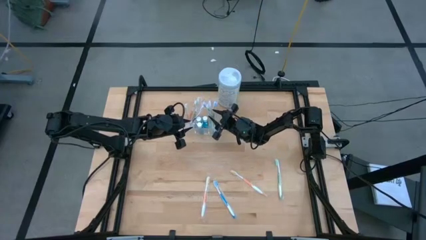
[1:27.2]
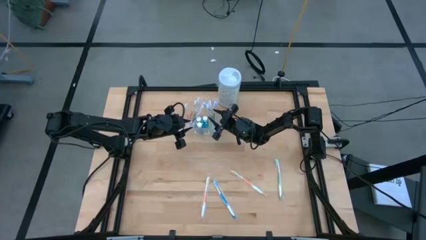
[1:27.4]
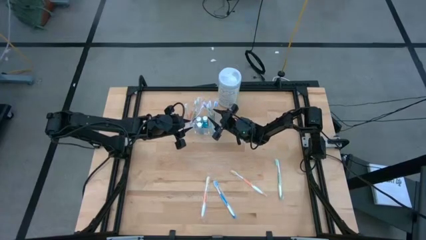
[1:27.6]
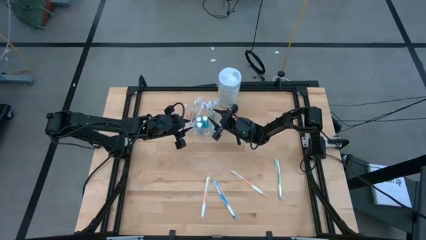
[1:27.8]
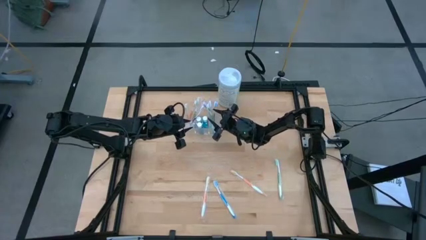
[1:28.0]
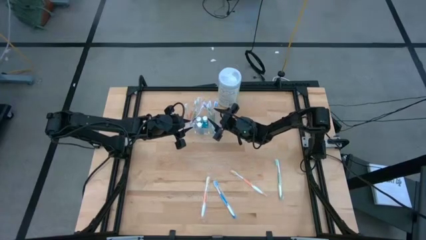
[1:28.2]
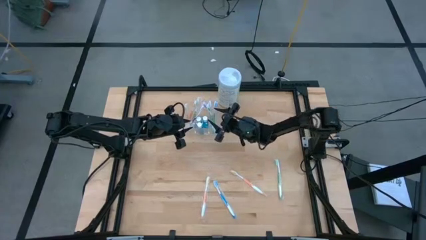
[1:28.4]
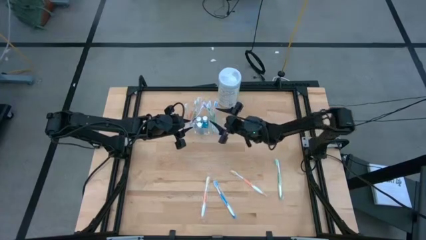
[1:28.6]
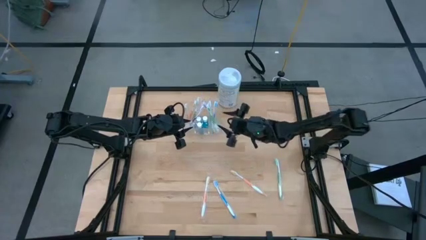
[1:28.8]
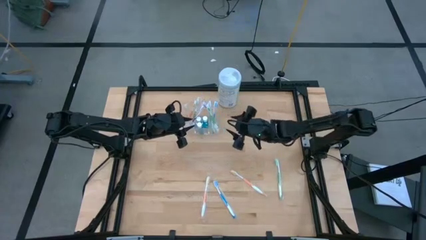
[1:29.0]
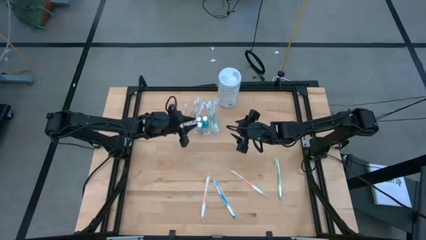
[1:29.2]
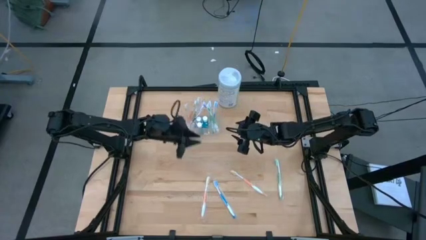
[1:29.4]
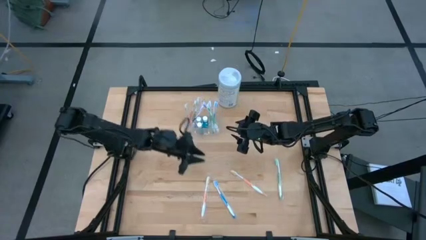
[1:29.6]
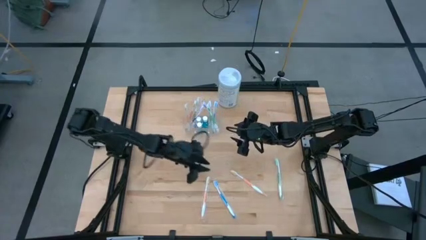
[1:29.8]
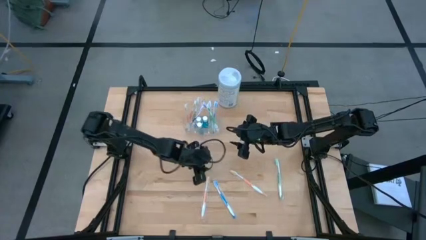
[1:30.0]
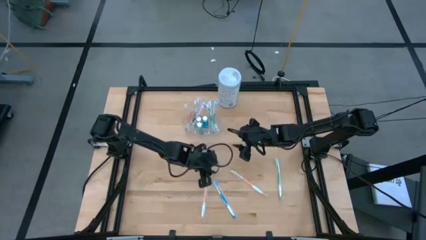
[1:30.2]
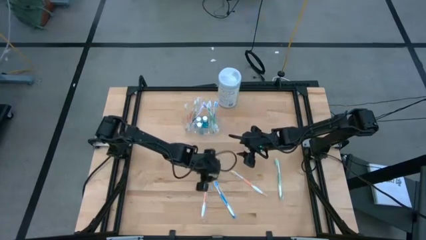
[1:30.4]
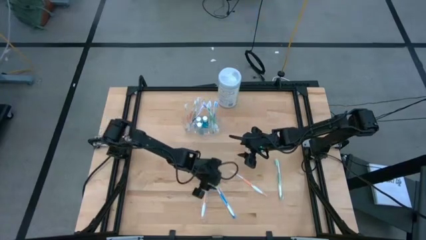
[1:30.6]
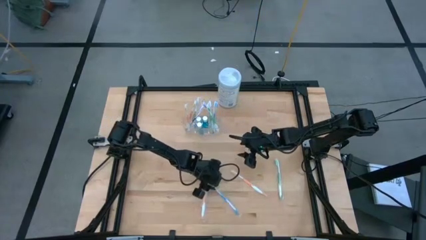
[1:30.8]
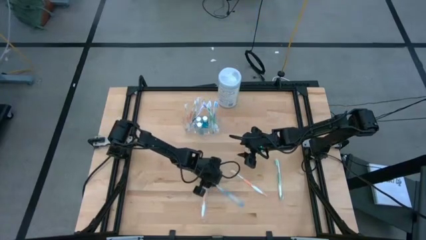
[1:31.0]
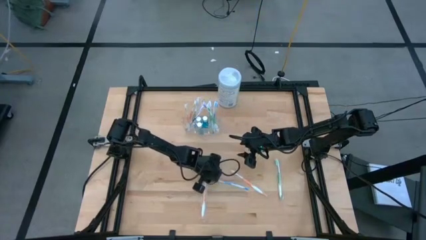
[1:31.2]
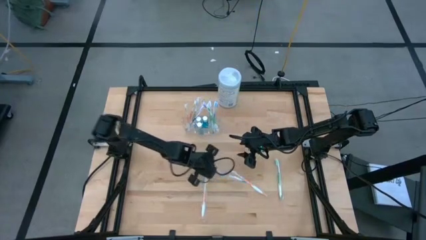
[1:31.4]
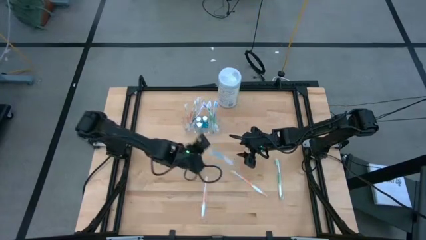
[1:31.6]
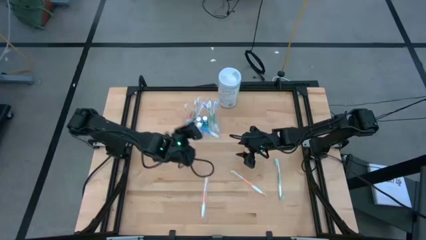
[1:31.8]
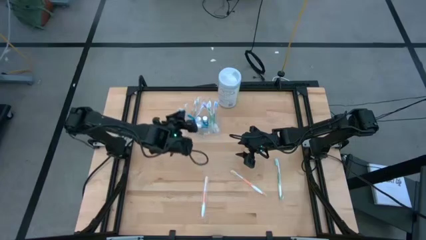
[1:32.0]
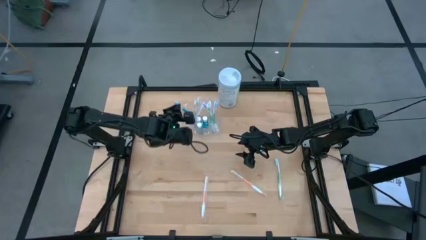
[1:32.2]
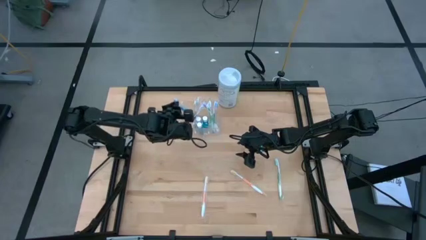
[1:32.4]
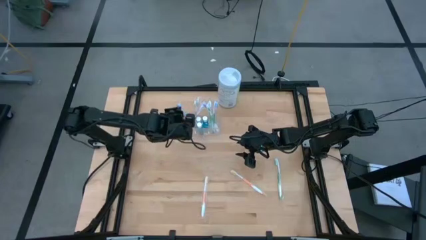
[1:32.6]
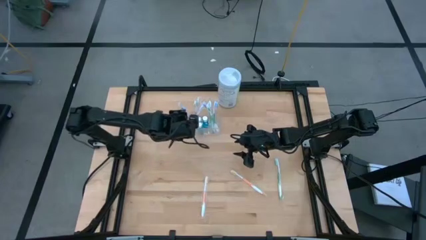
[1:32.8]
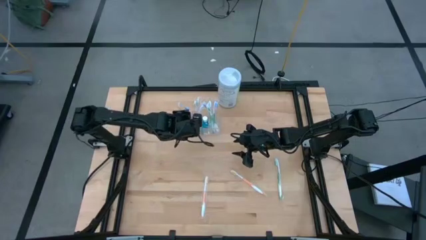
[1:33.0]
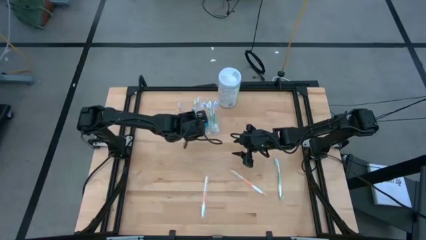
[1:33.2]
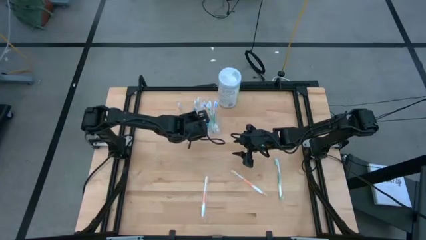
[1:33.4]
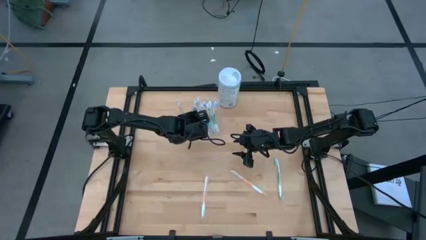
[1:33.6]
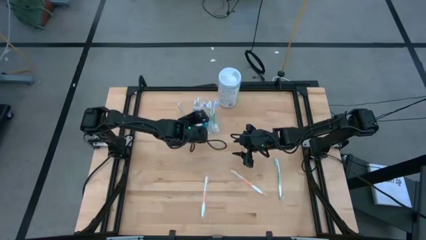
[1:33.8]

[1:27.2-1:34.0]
Task: Pick & Place toothbrushing station
Put the blue toothbrush into the transparent organizer

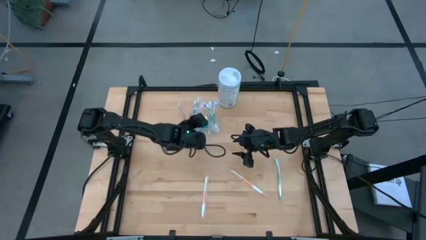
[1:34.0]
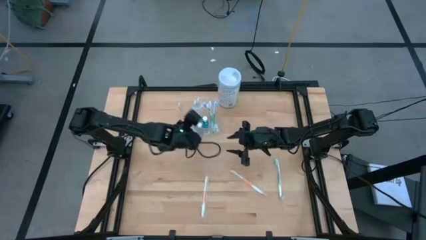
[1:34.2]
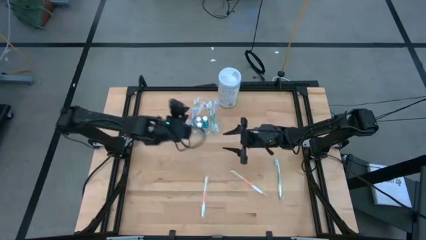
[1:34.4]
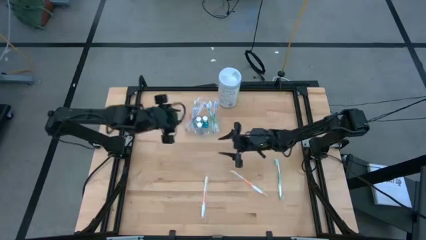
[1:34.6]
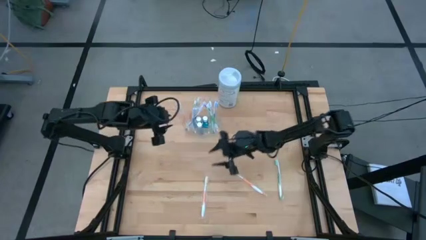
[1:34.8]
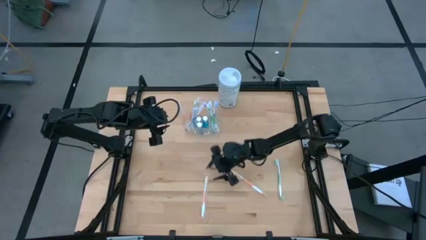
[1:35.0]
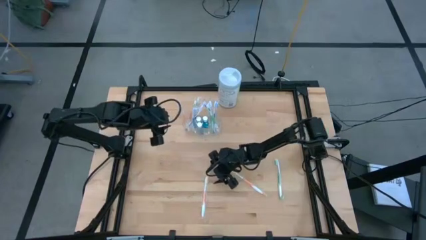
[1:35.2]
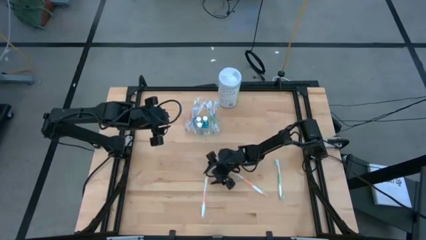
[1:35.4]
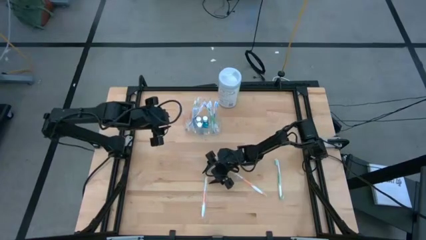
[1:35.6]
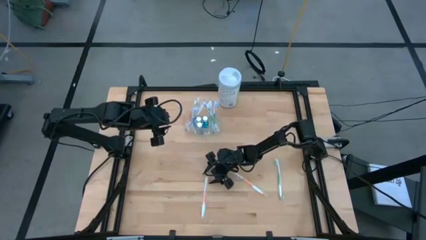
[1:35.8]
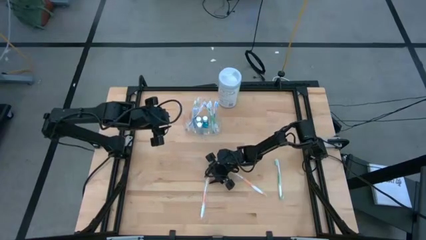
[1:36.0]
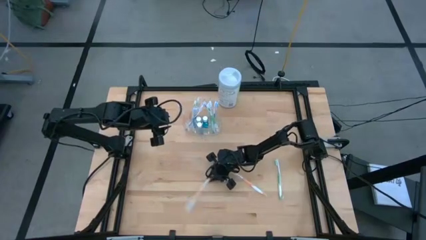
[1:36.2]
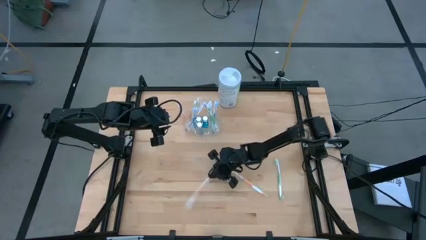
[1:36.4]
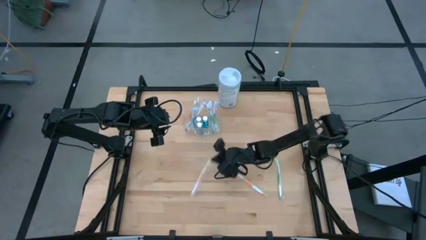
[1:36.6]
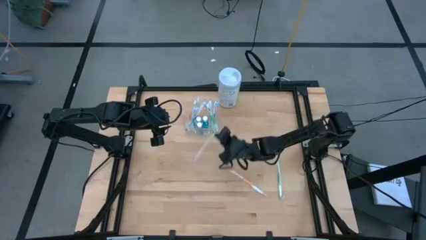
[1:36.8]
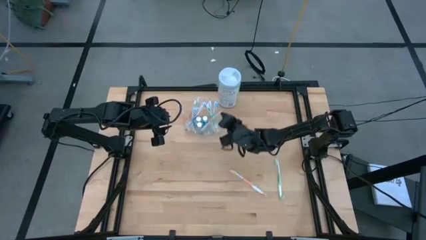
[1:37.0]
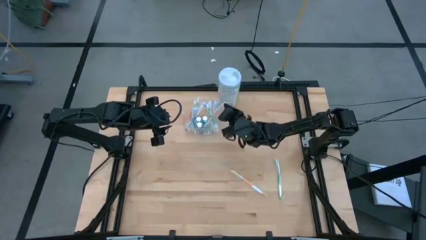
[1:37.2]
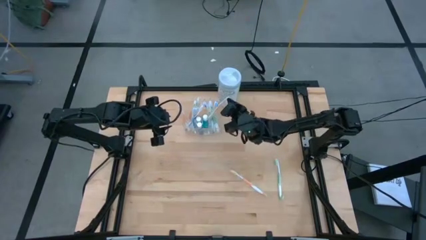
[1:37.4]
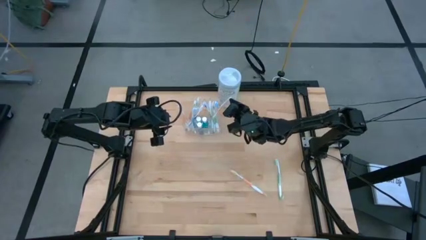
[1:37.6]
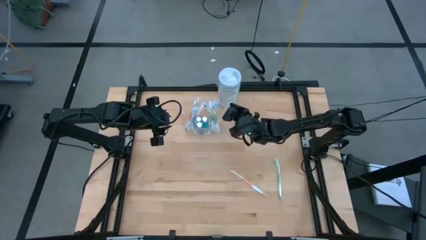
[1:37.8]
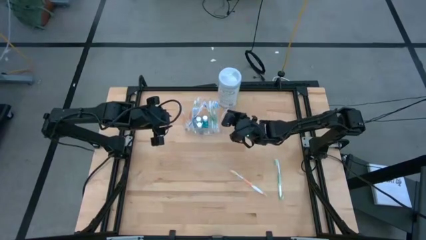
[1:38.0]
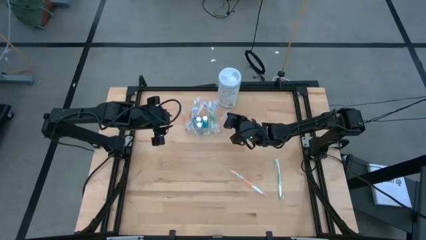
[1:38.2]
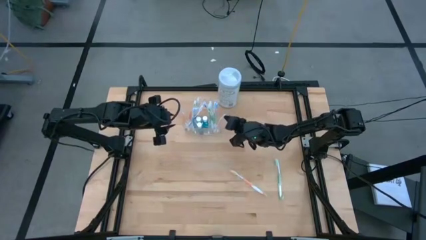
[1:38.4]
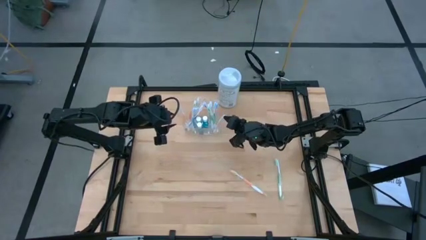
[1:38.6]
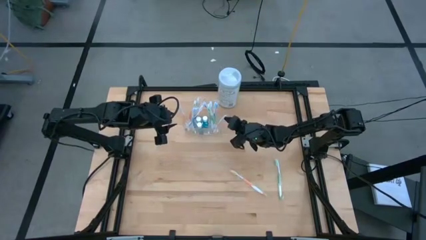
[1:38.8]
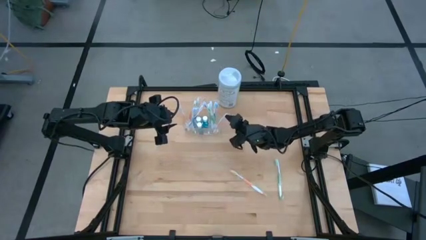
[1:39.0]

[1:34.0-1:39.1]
Put the orange toothbrush into the transparent organizer
